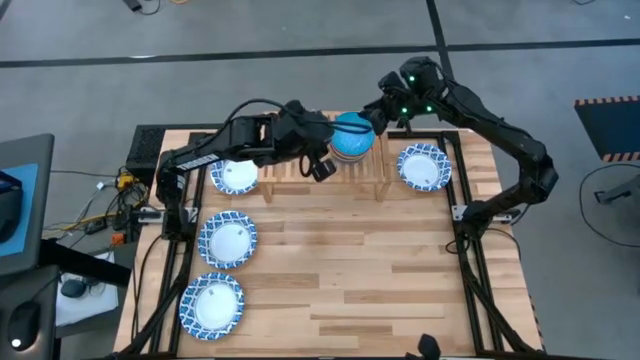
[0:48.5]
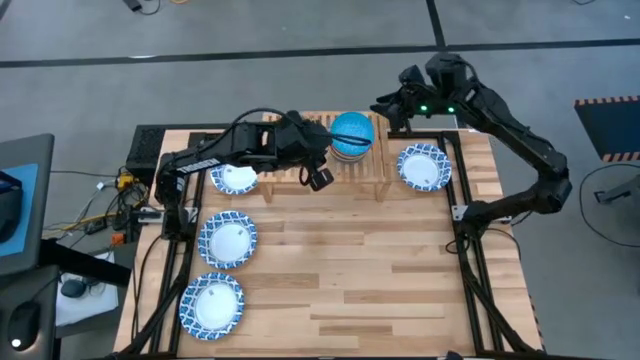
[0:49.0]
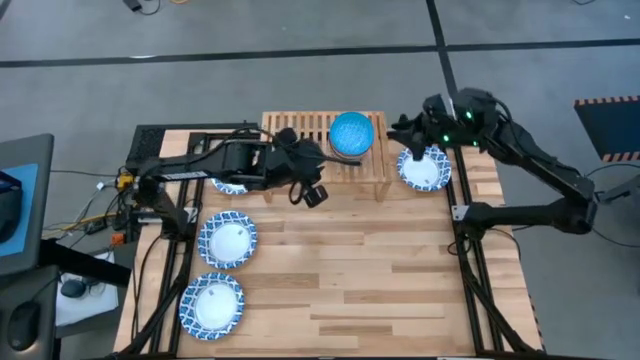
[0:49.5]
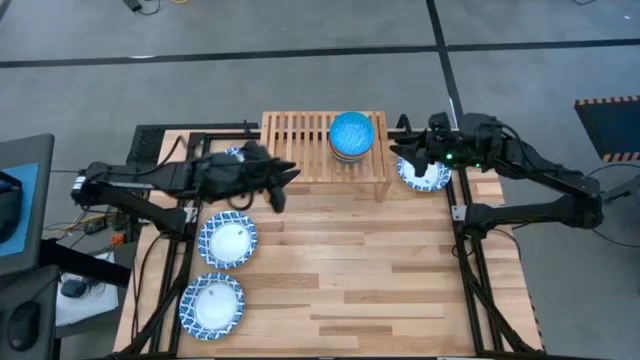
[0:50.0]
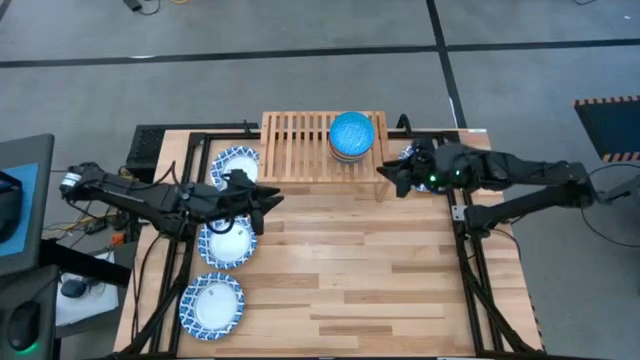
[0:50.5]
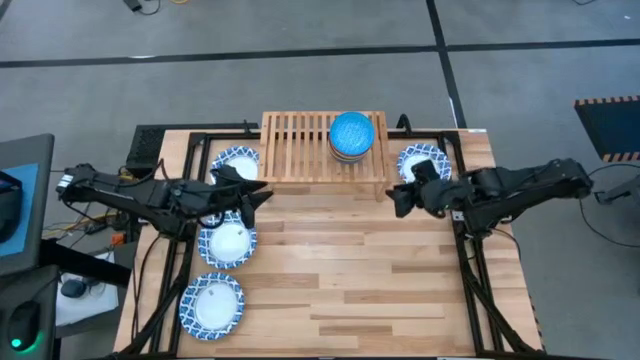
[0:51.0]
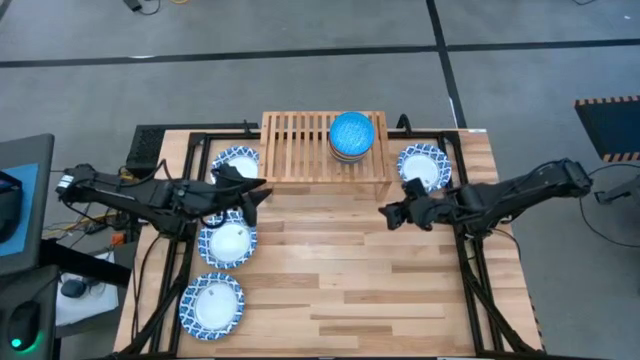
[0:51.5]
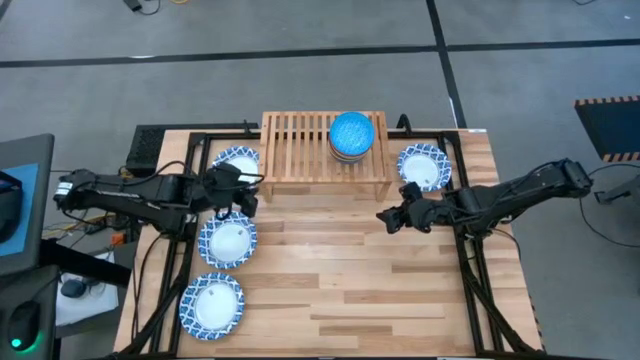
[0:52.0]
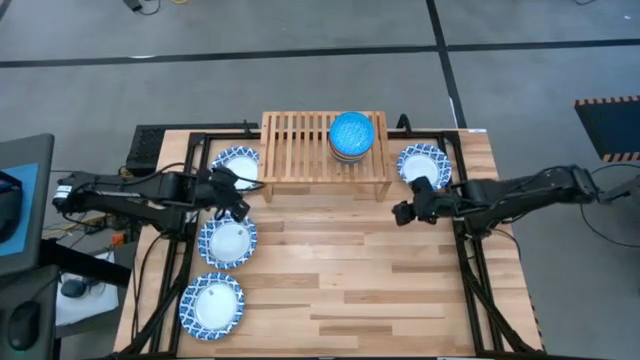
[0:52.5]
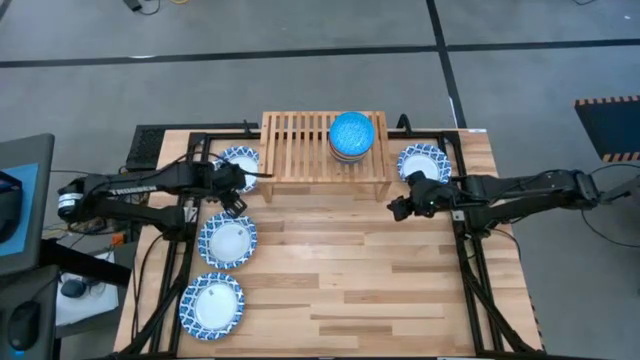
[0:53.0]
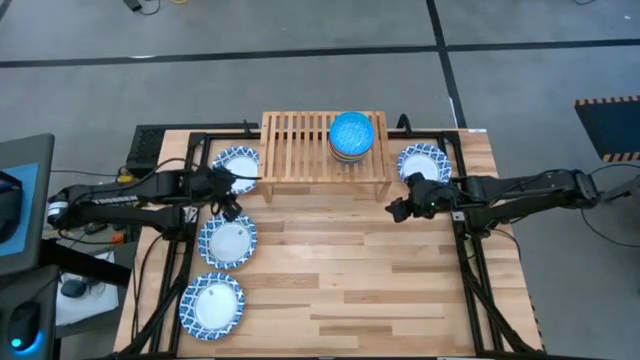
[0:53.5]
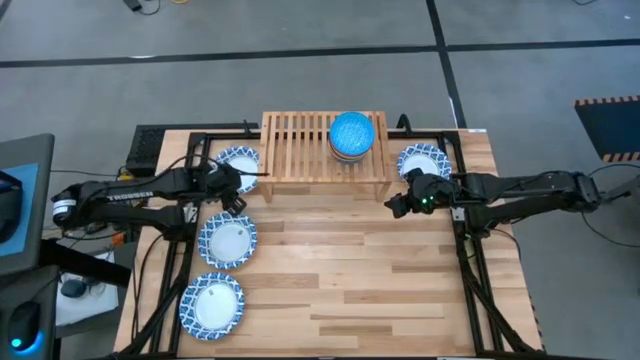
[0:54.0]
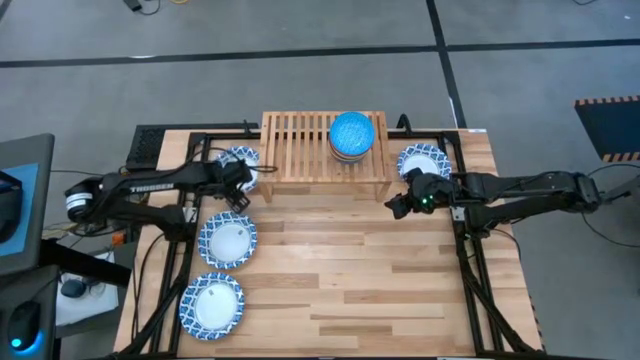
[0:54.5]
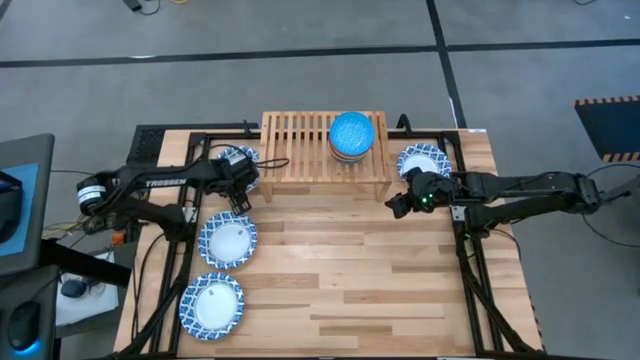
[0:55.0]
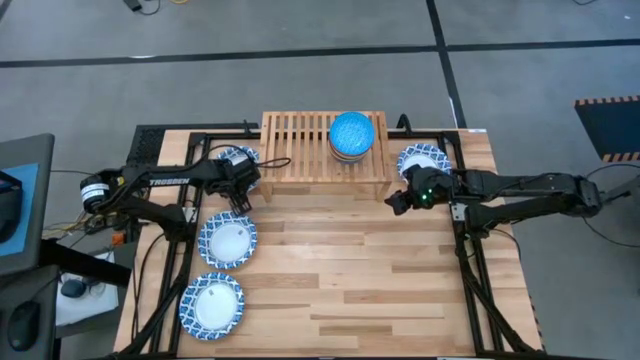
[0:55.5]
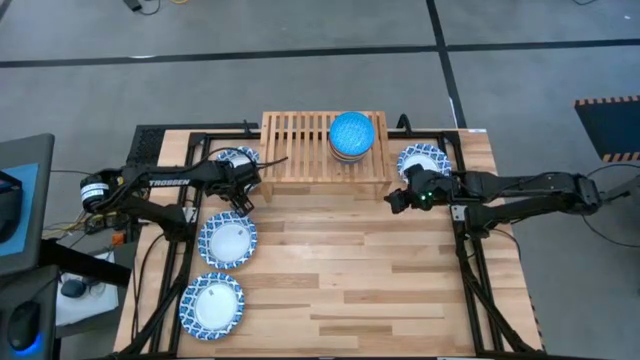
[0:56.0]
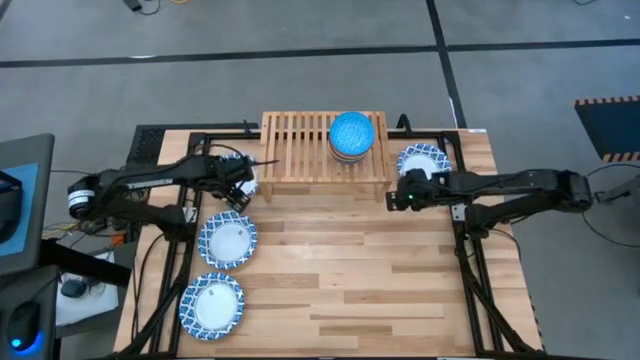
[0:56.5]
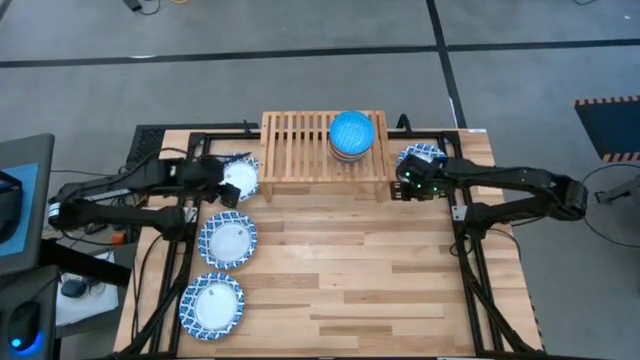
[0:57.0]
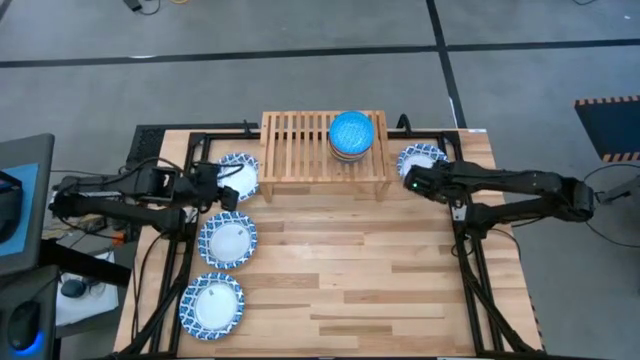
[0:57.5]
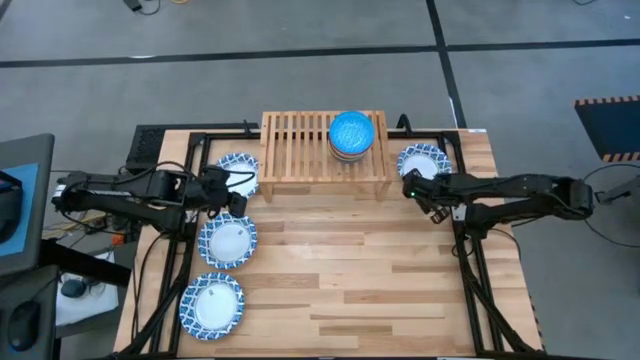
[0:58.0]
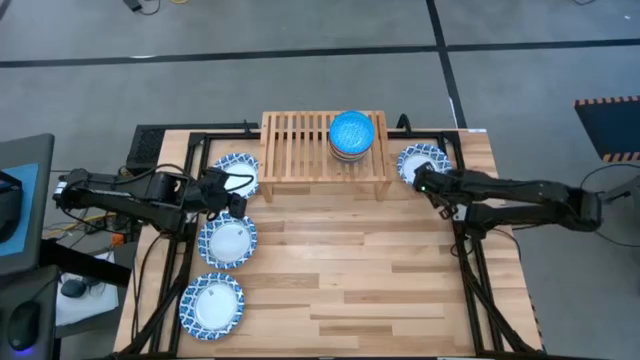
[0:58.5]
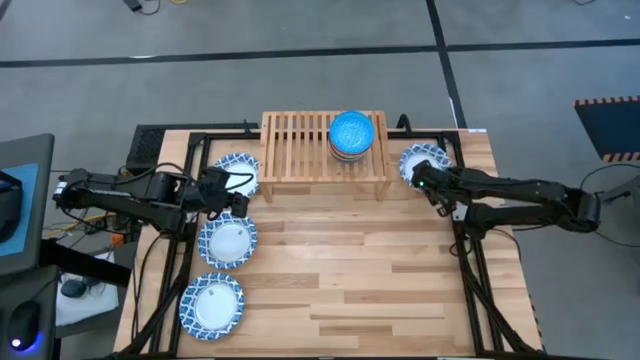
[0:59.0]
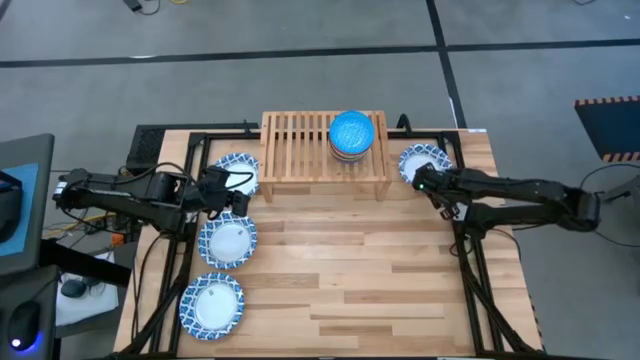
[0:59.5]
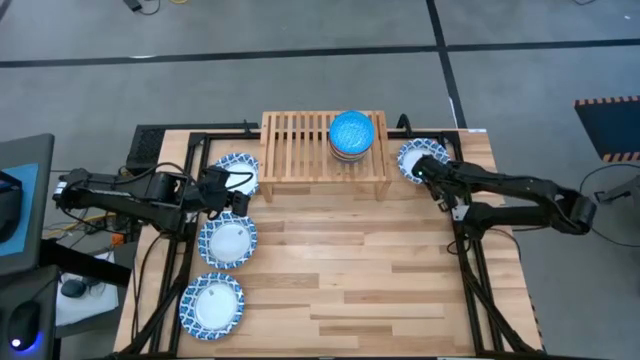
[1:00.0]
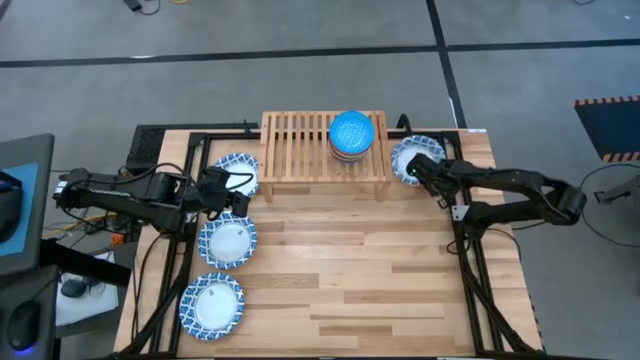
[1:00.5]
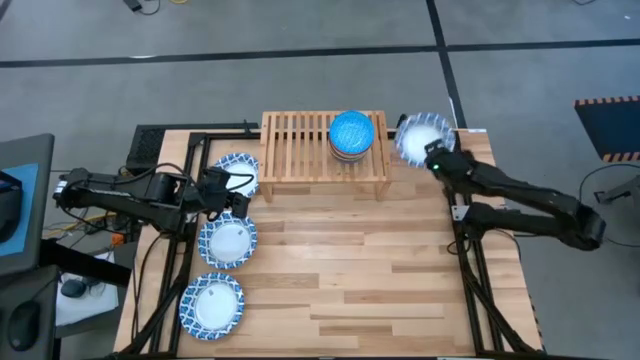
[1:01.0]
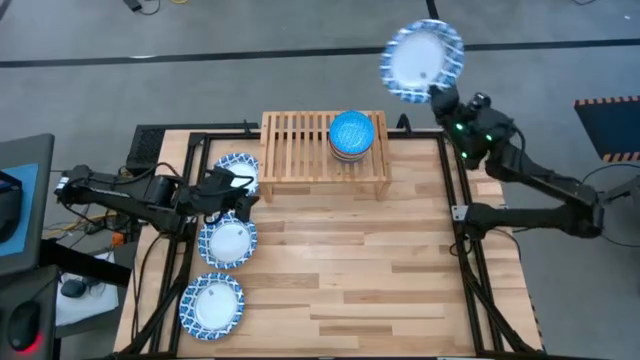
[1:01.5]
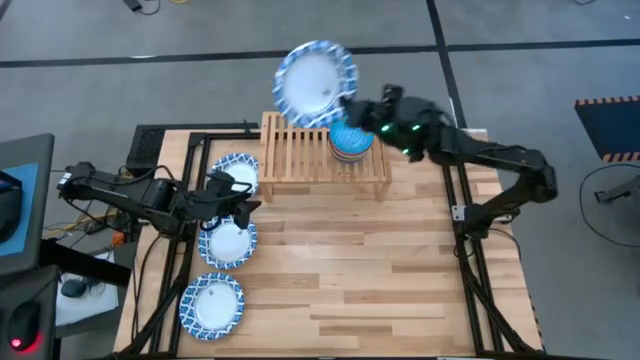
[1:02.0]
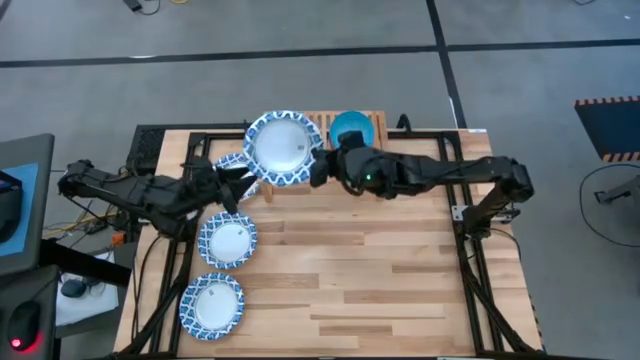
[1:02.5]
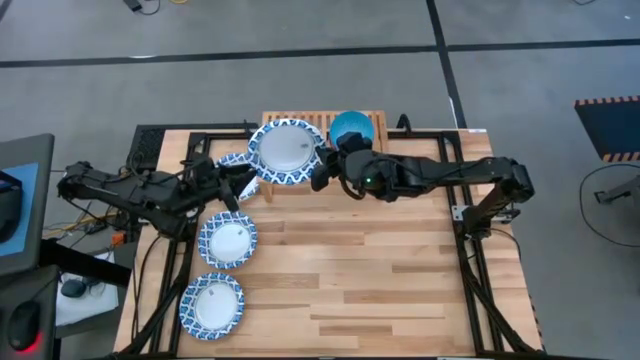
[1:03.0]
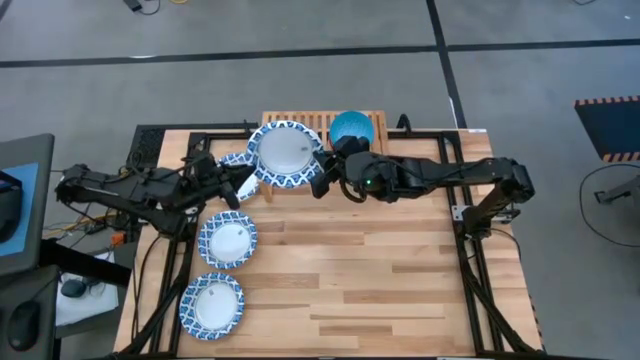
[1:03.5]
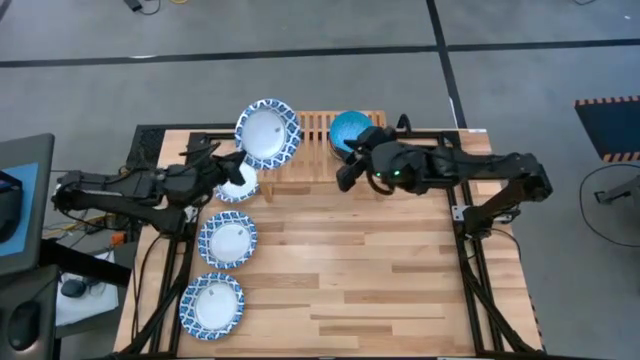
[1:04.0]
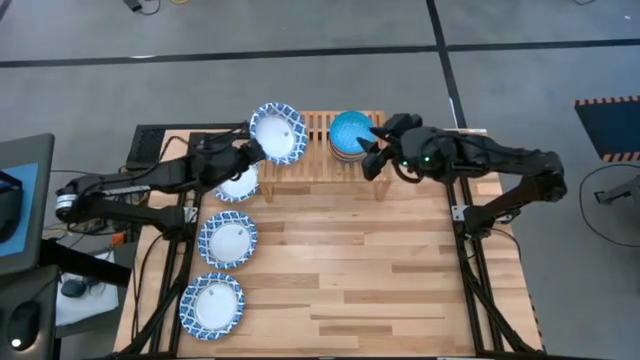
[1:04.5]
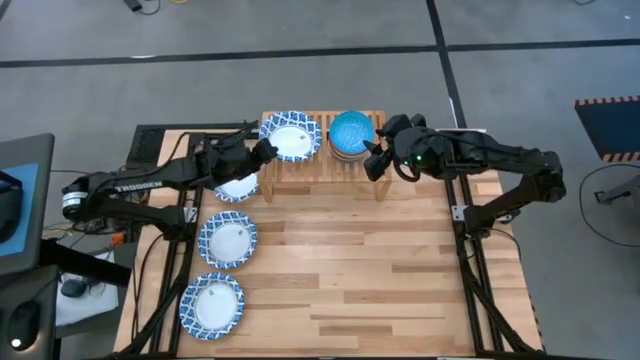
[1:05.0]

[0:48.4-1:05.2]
Task: Place and stack bowls onto a shelf
Put the top right white patterned bowl on the shelf

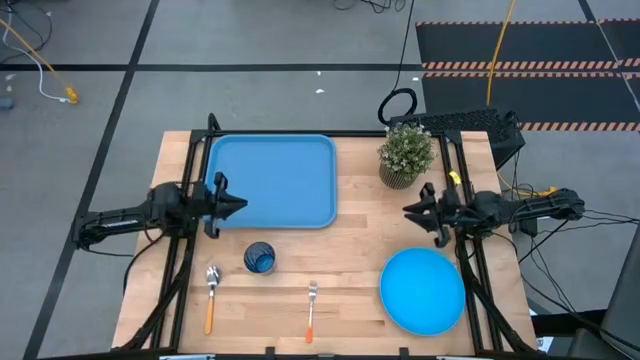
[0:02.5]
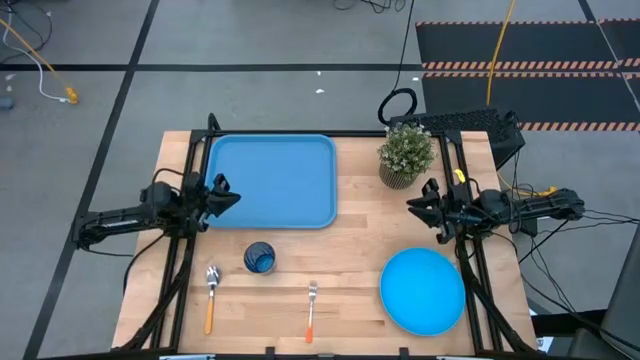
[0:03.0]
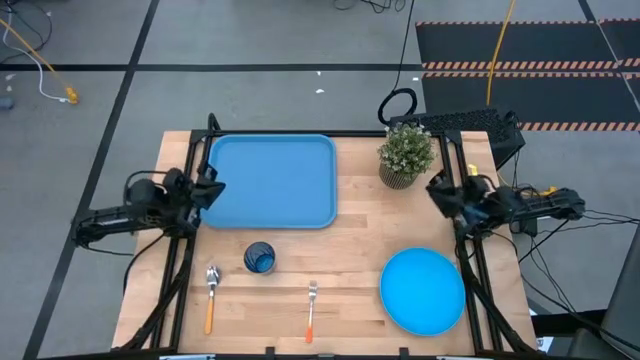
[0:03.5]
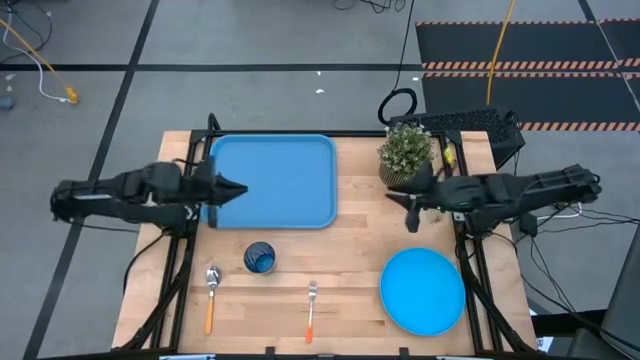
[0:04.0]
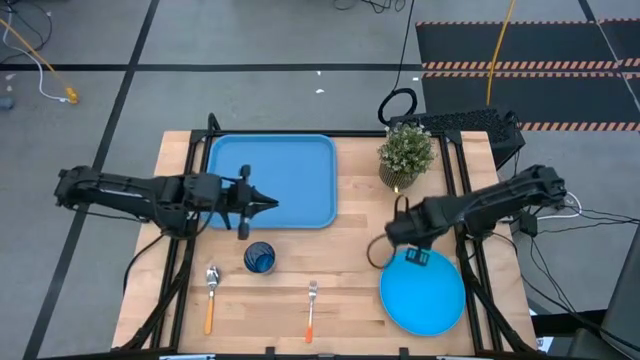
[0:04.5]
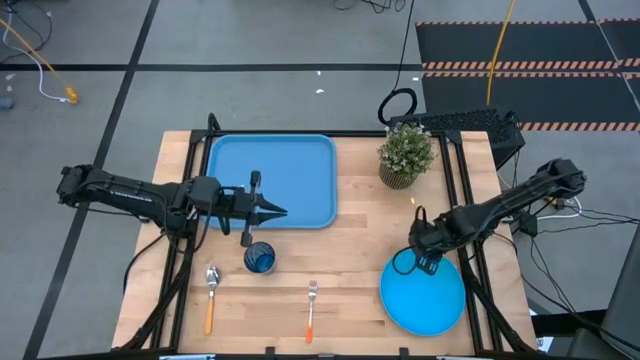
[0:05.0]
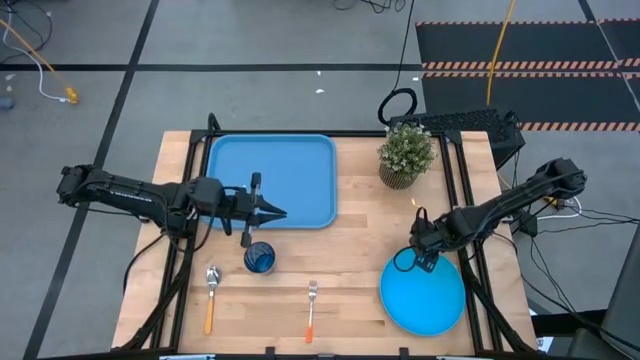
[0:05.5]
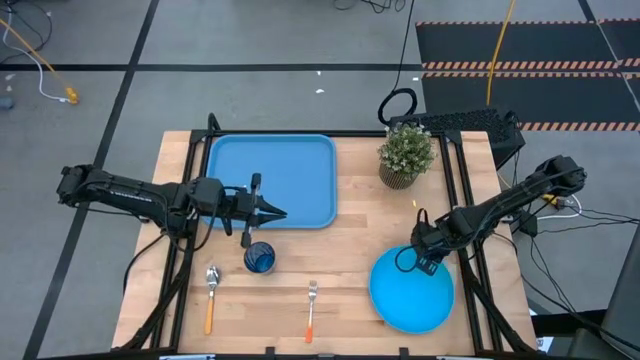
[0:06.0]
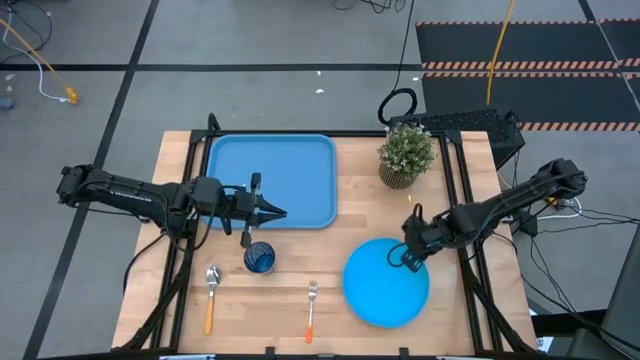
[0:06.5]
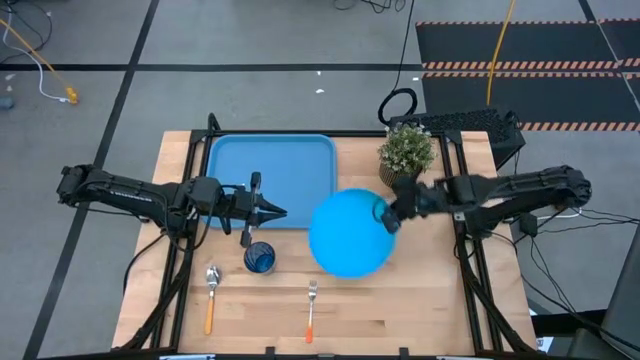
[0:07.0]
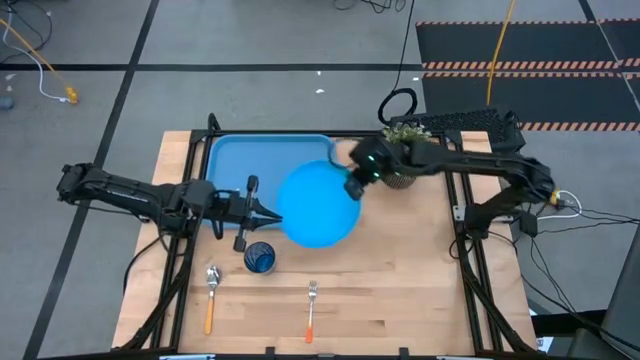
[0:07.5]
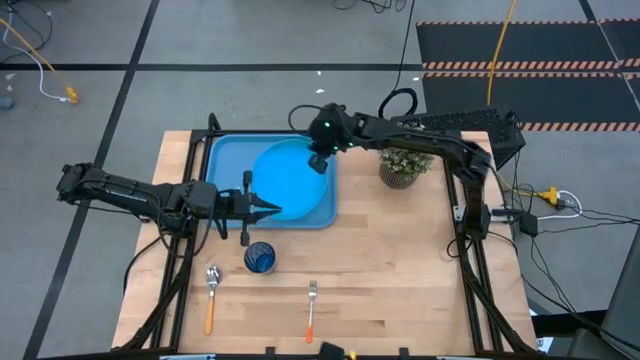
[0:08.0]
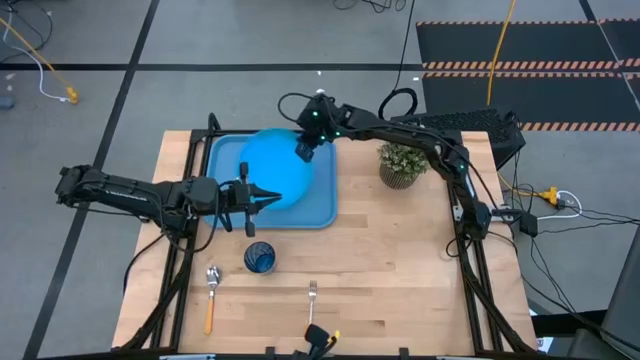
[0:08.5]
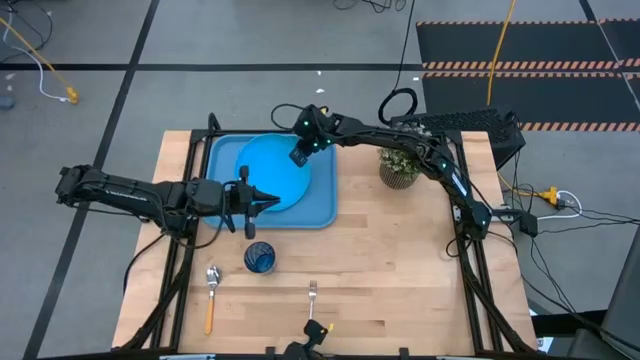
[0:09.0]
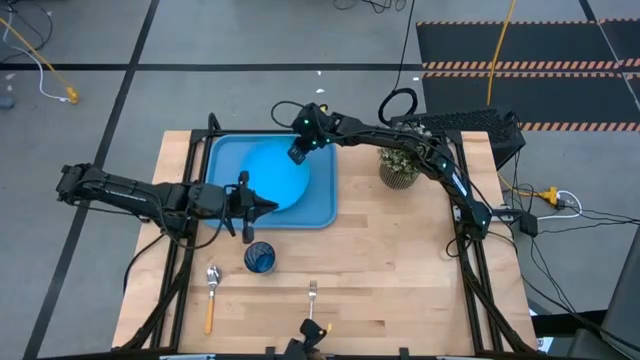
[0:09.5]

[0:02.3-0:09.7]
Task: Pick and place plate/cup/fork/spoon on tray
Put the blue plate on the blue tray
